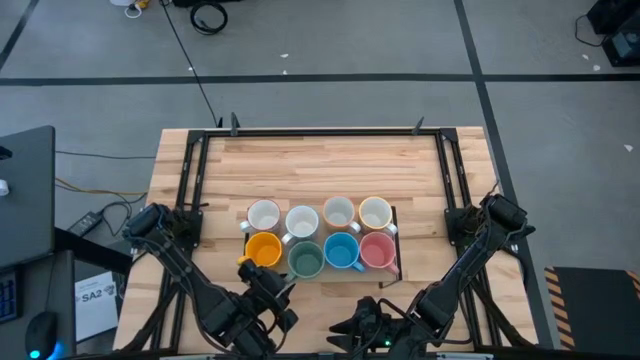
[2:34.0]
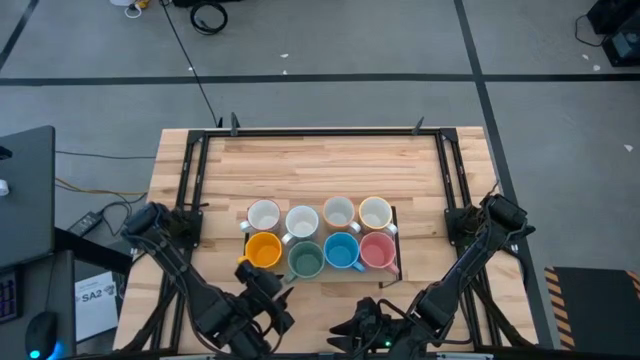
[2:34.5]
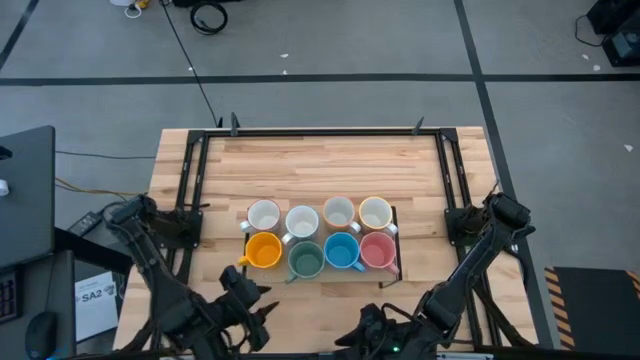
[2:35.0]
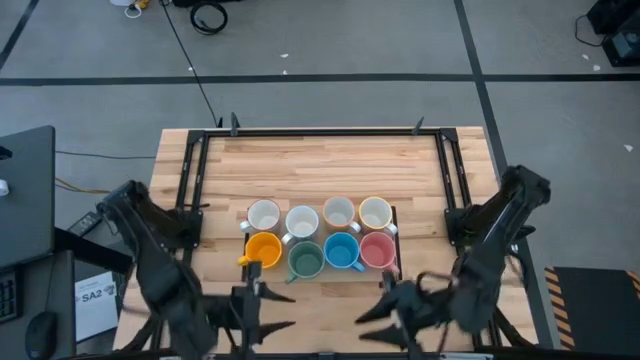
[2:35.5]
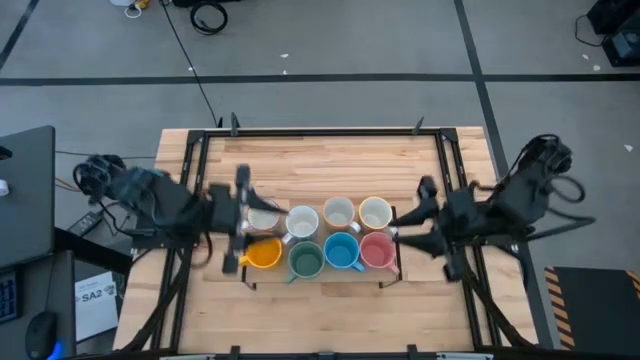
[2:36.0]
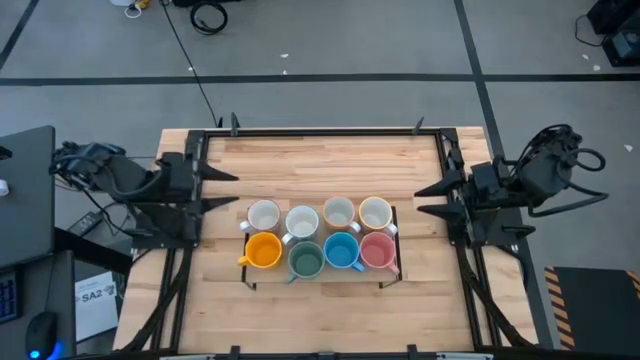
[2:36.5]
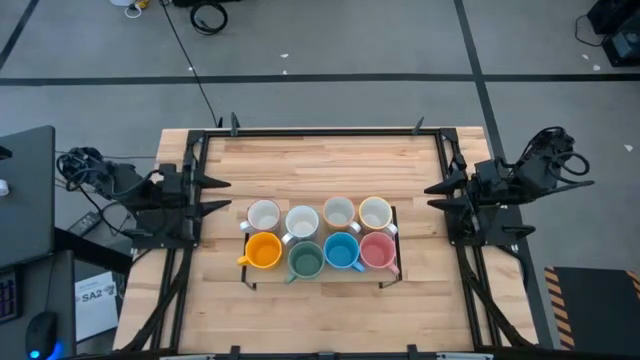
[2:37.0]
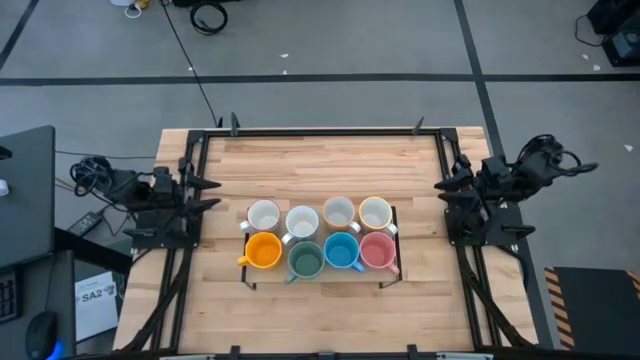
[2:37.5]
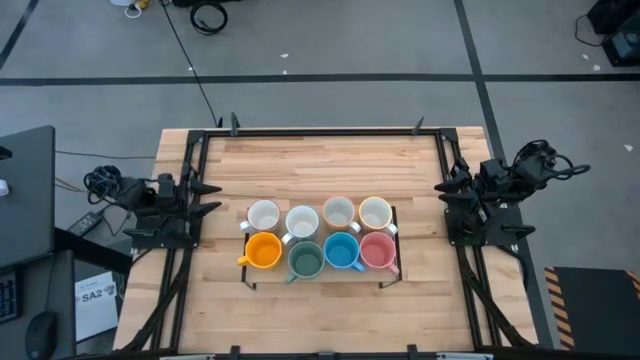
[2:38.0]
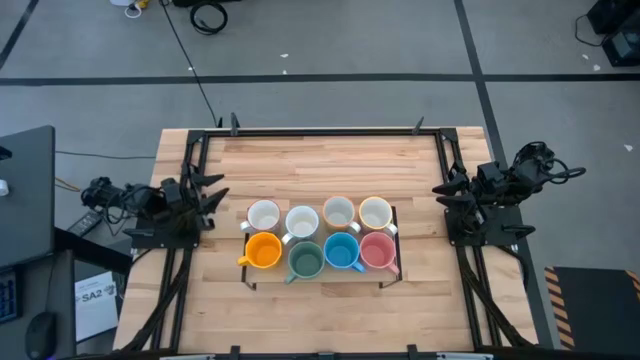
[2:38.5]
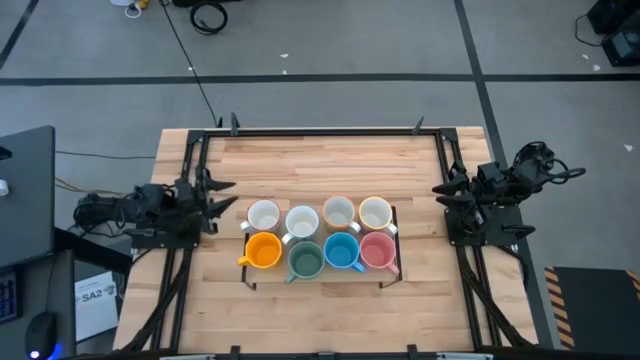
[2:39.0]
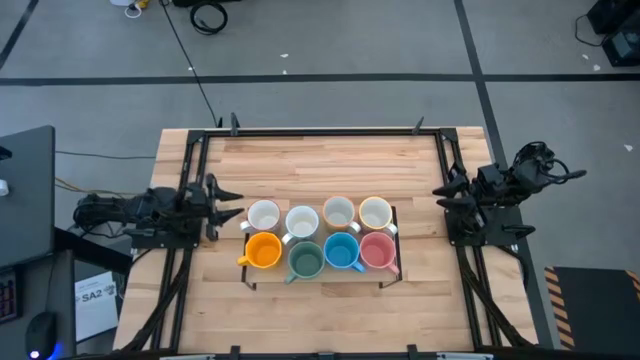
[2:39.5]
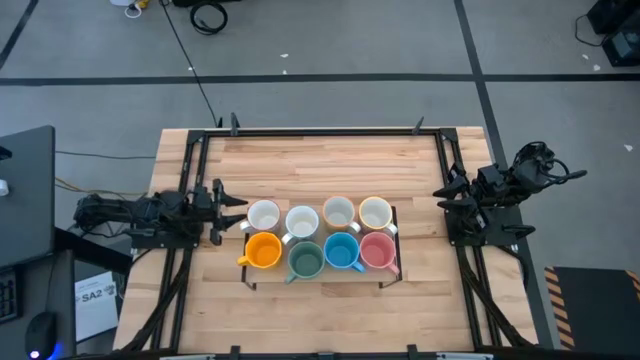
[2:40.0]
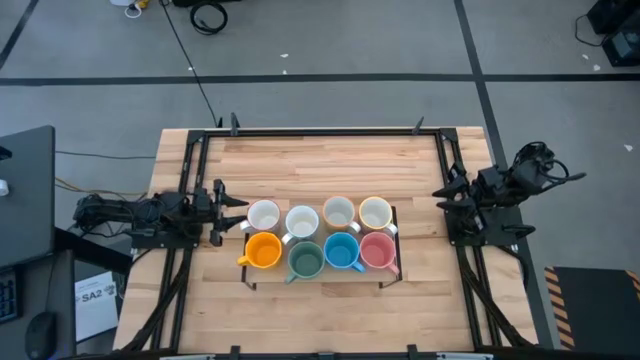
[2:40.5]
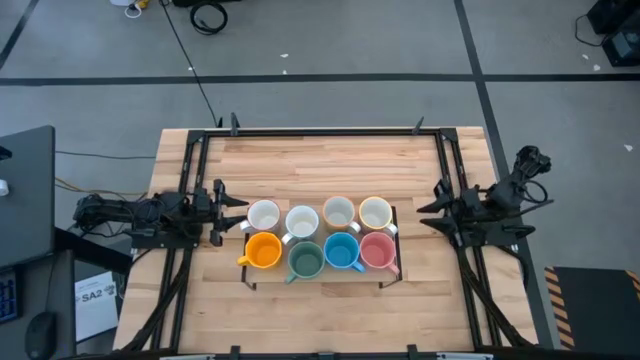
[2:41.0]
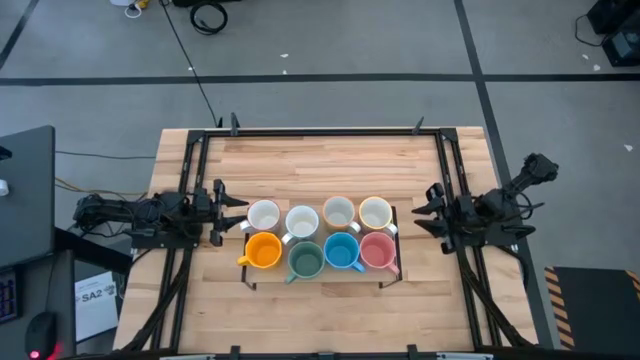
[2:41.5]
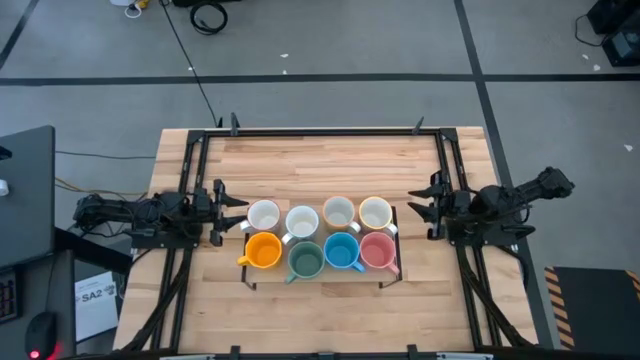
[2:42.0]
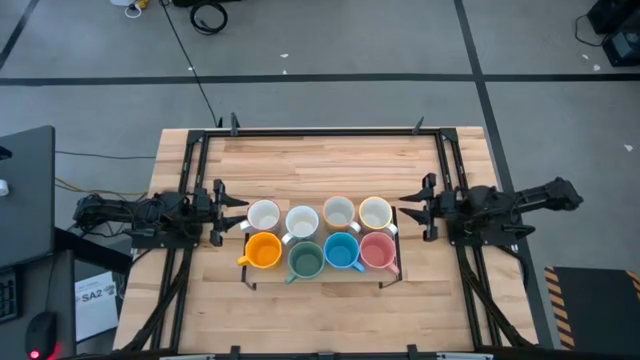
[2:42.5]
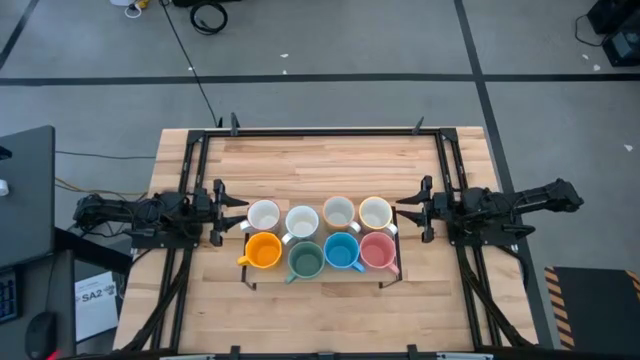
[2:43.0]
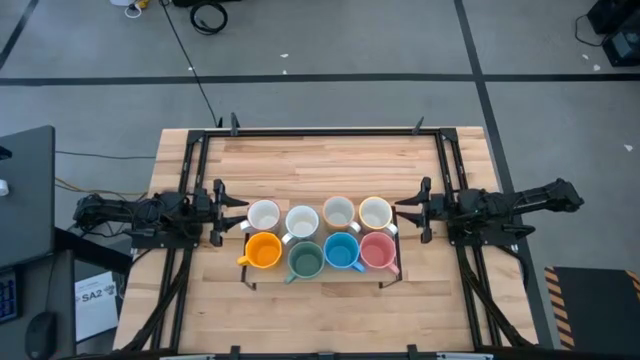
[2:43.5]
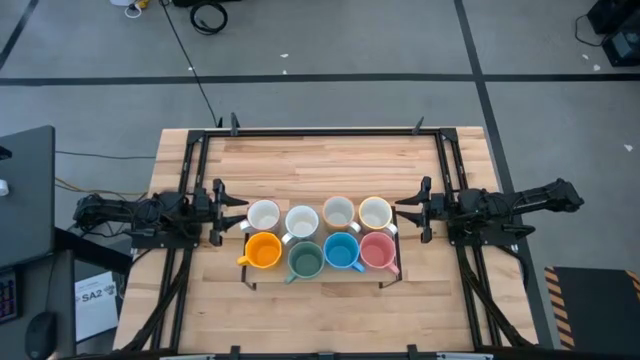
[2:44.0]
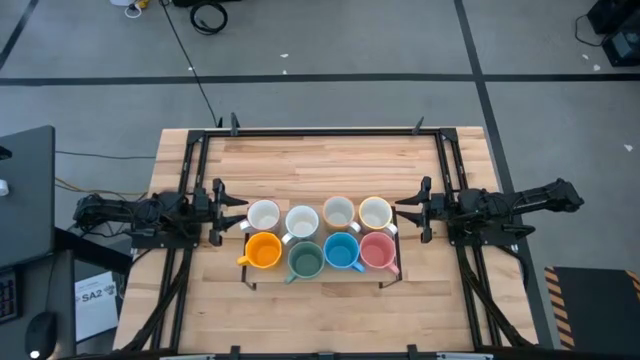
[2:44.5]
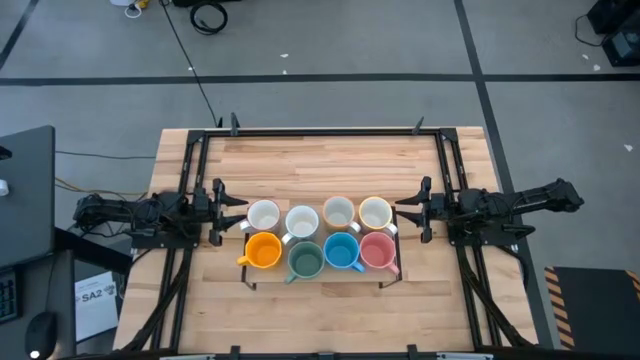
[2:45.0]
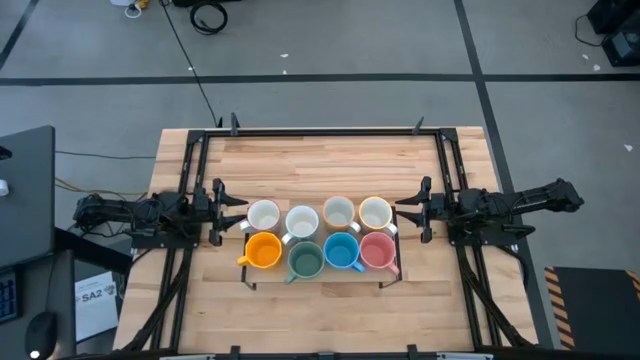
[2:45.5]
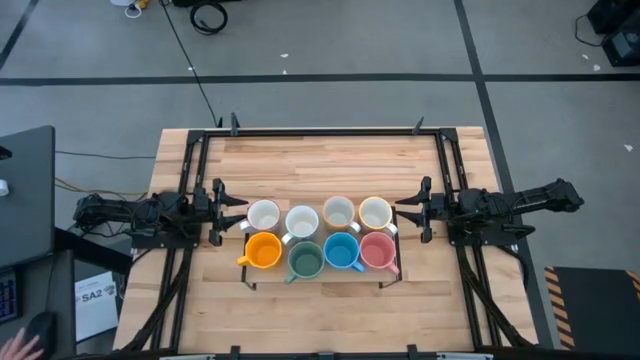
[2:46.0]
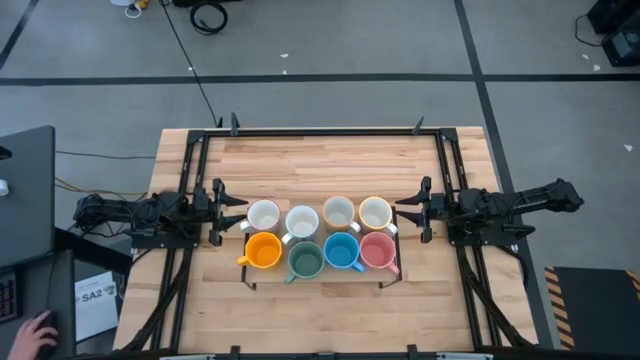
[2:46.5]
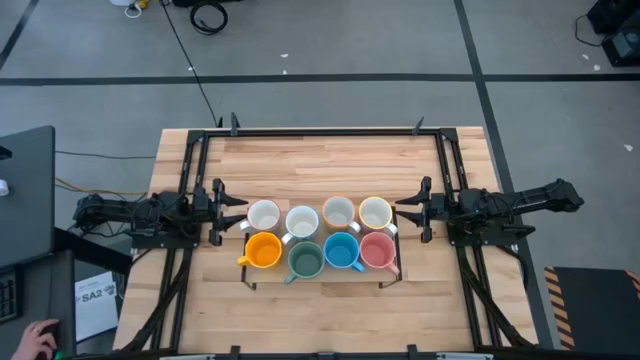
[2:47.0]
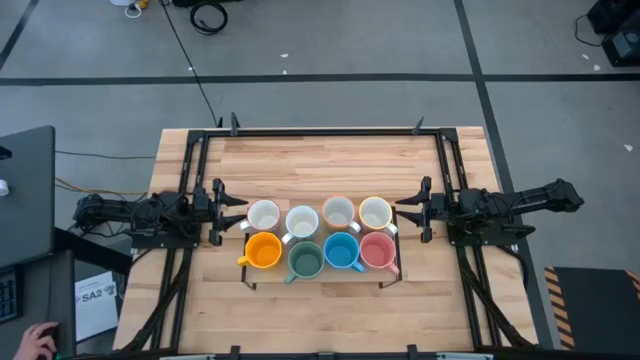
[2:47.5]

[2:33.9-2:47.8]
Task: Place coffee mugs
Return to Home Position

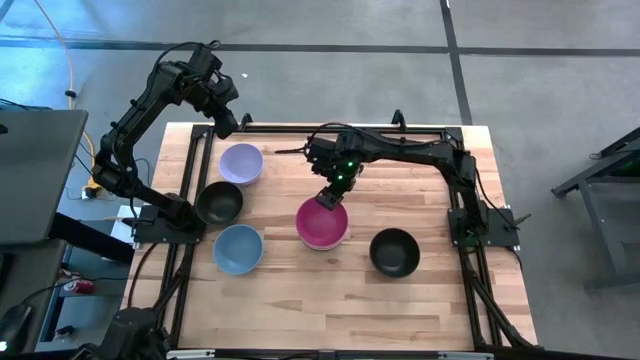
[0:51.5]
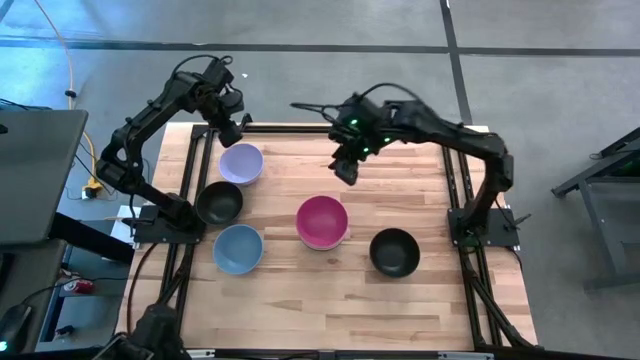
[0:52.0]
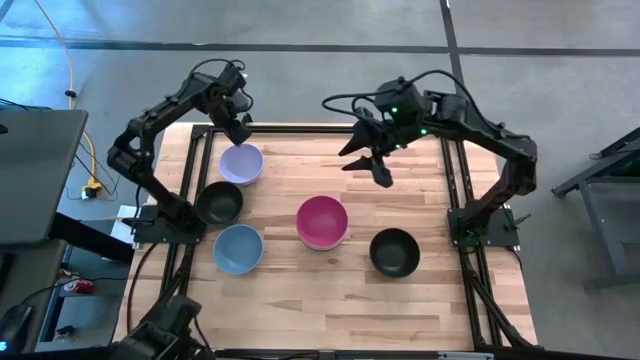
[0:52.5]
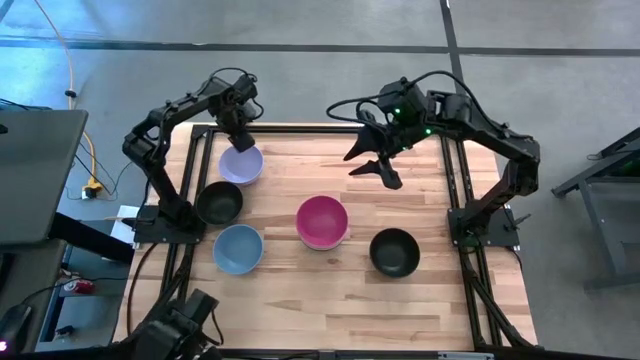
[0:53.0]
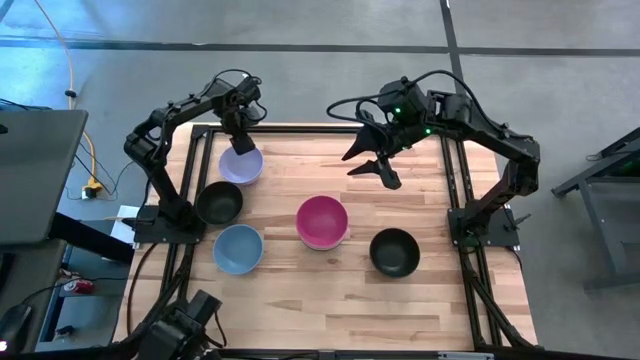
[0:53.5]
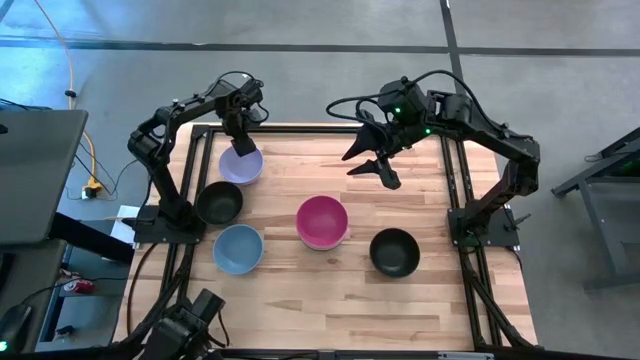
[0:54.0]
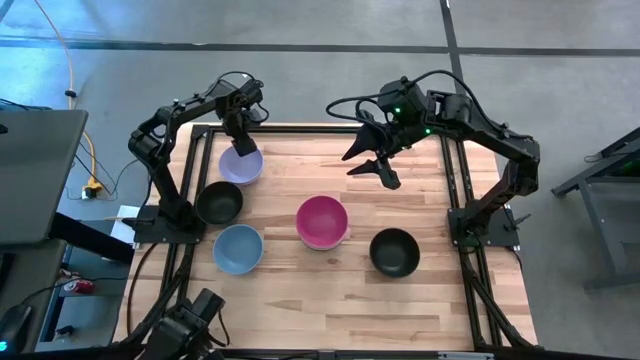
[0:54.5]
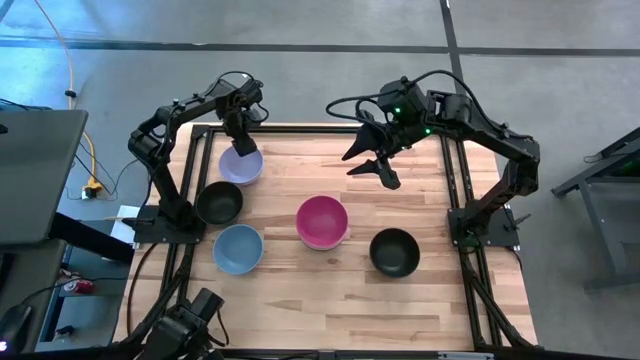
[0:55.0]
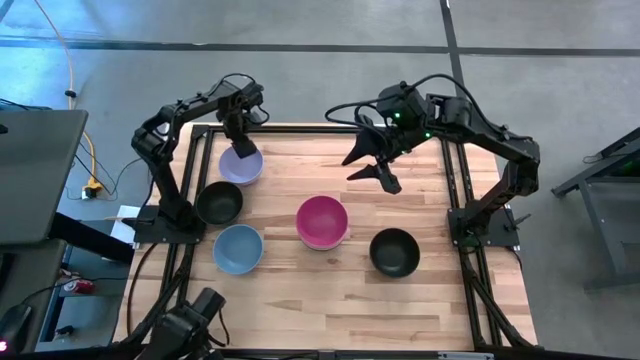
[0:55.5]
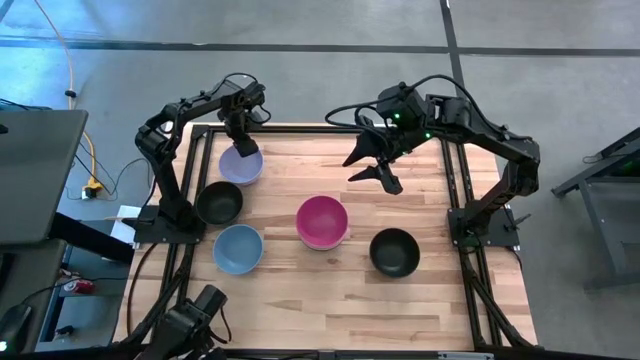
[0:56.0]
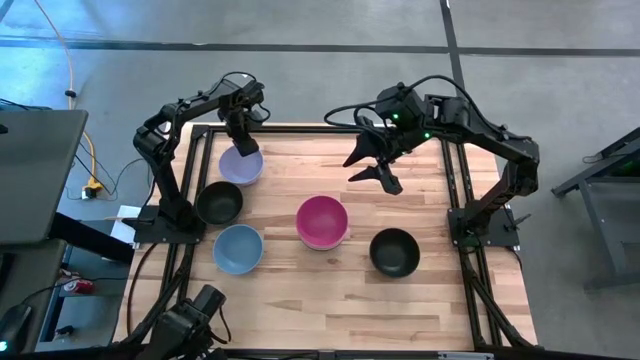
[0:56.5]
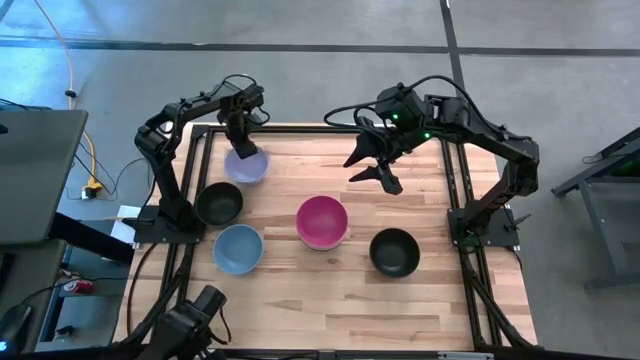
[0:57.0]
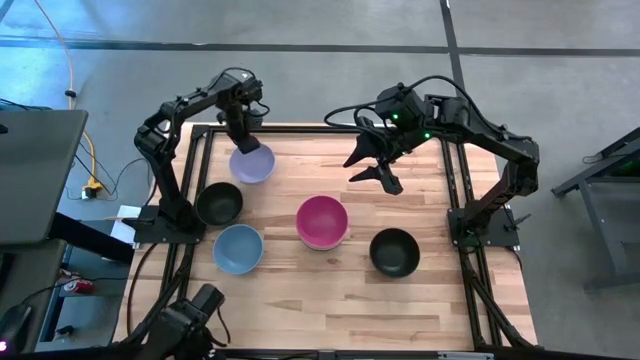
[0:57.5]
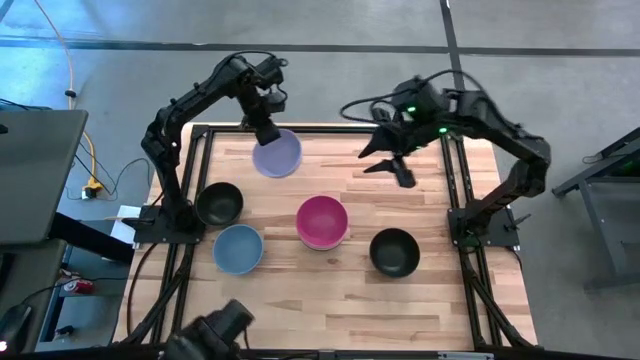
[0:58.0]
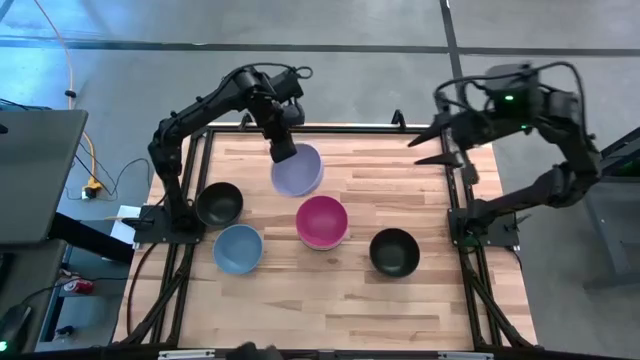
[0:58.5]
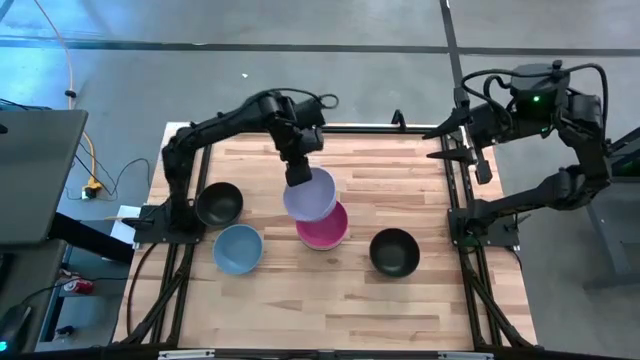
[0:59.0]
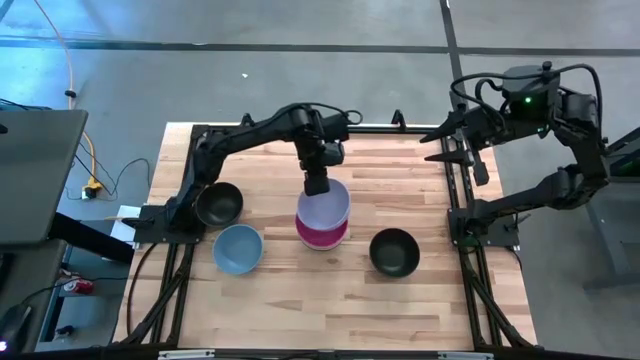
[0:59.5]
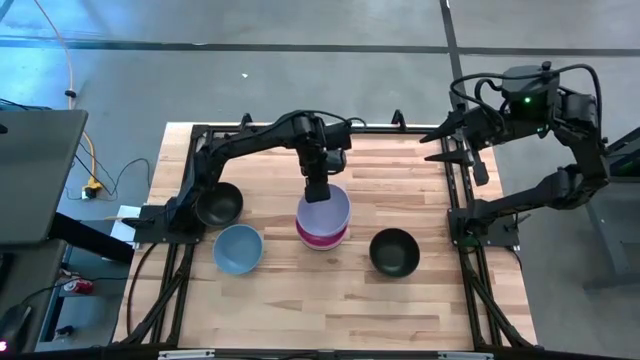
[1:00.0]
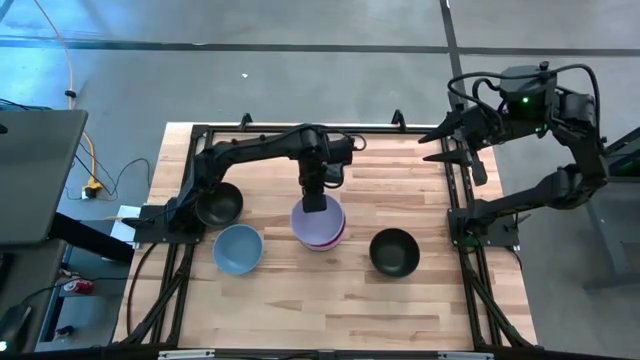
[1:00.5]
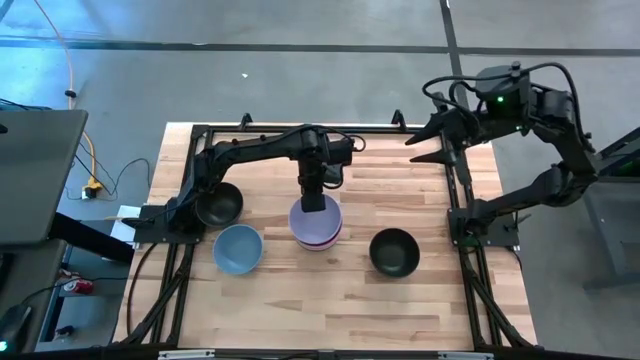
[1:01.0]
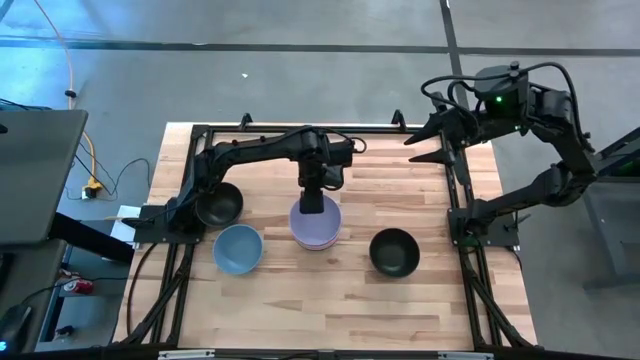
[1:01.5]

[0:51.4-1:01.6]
Task: Nest bowls inside each other
Stack the purple bowl on top of the pink bowl
